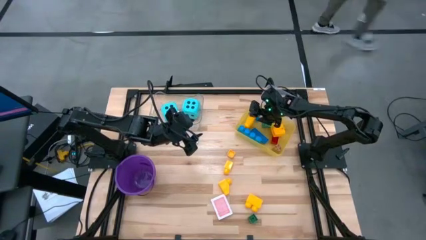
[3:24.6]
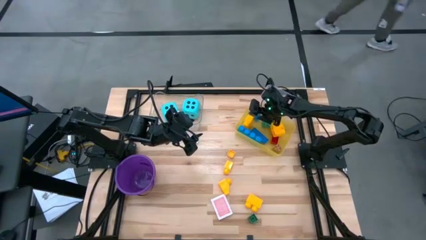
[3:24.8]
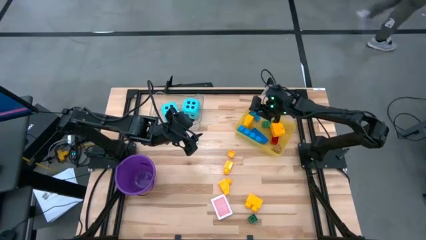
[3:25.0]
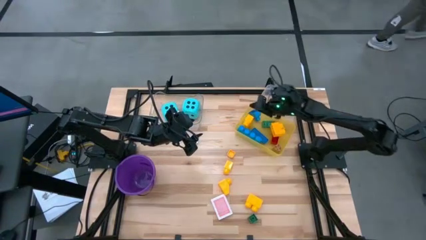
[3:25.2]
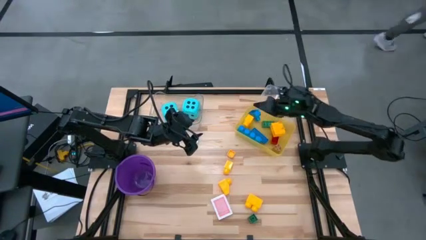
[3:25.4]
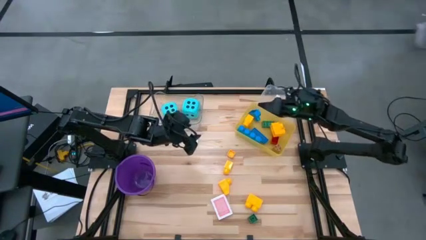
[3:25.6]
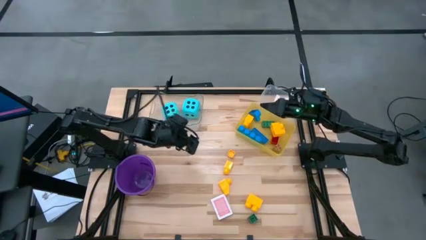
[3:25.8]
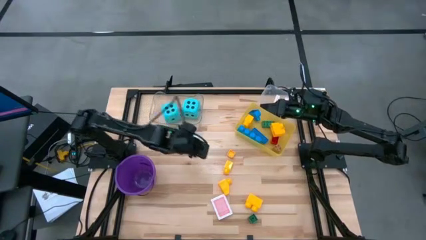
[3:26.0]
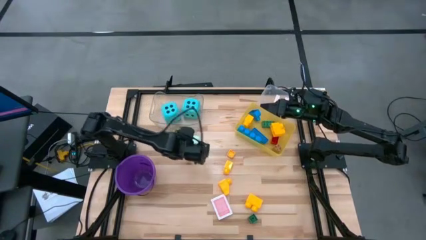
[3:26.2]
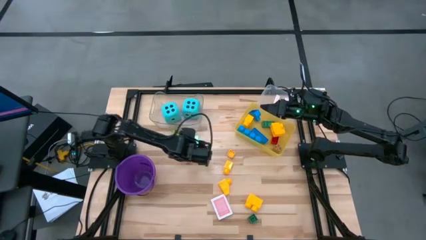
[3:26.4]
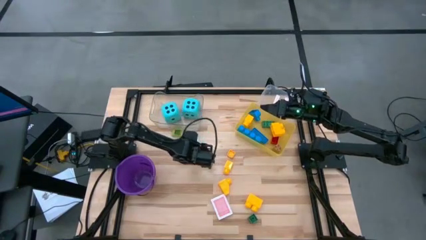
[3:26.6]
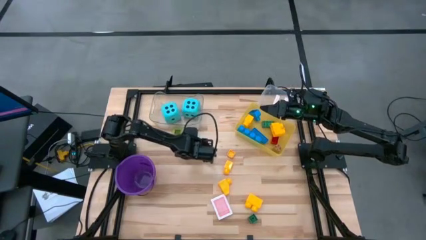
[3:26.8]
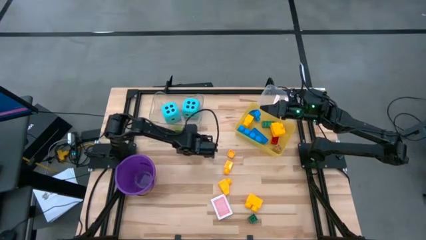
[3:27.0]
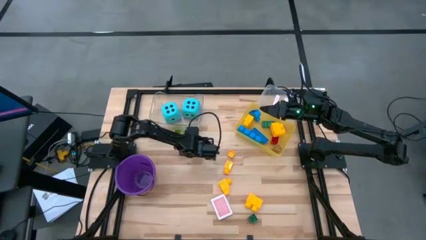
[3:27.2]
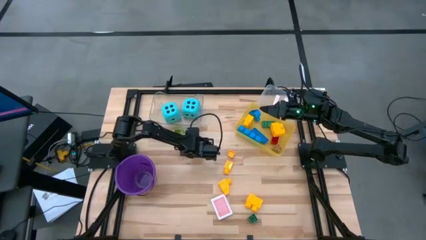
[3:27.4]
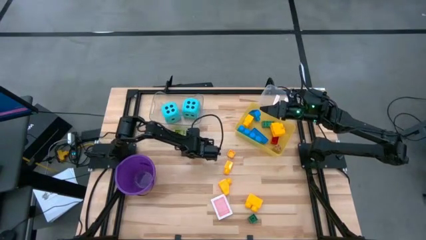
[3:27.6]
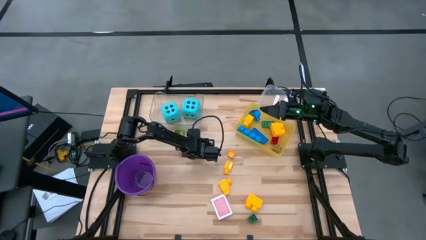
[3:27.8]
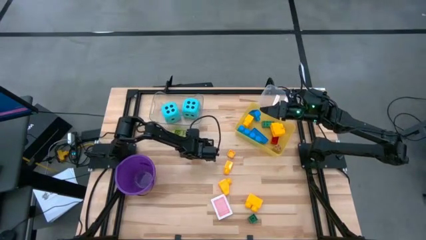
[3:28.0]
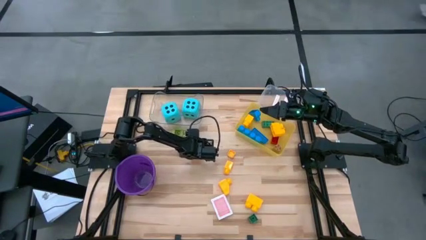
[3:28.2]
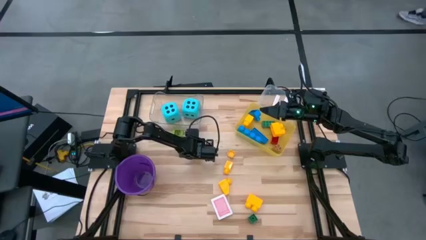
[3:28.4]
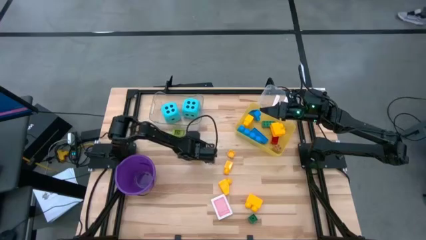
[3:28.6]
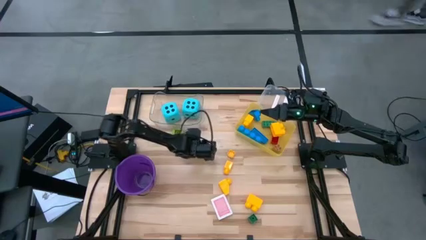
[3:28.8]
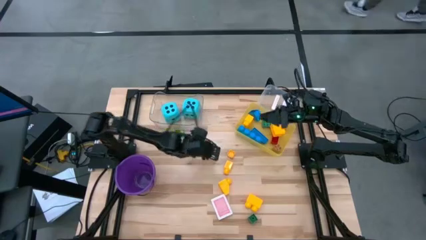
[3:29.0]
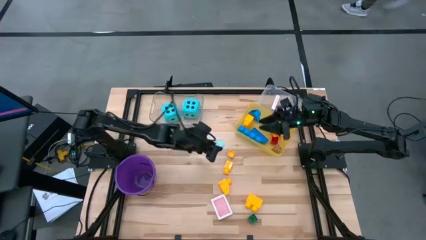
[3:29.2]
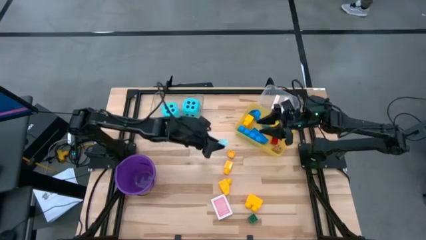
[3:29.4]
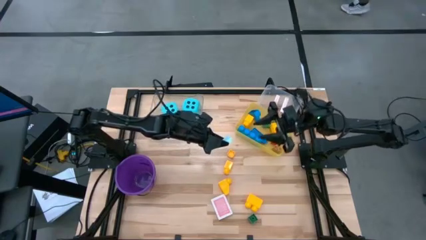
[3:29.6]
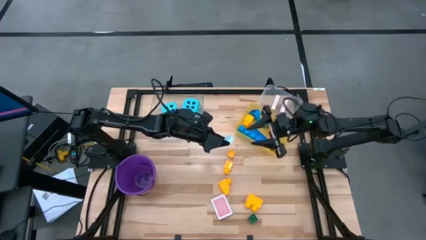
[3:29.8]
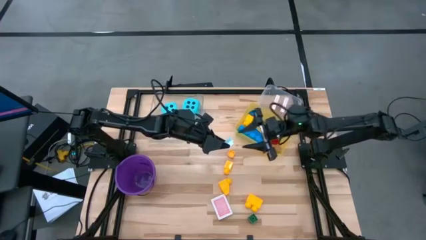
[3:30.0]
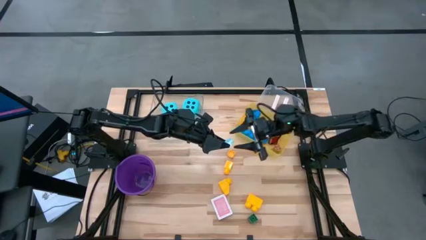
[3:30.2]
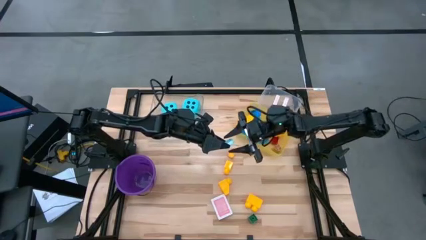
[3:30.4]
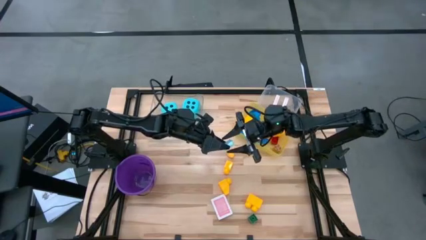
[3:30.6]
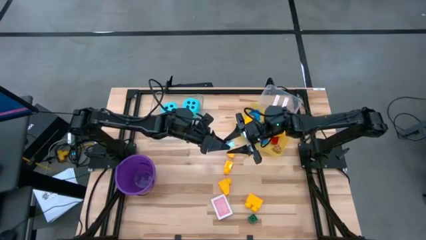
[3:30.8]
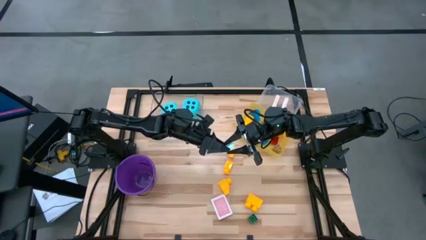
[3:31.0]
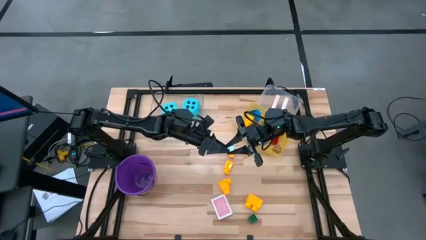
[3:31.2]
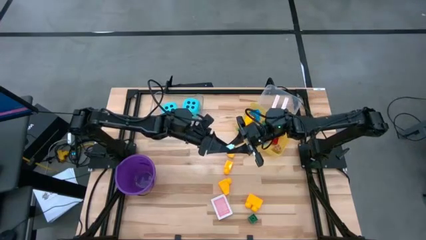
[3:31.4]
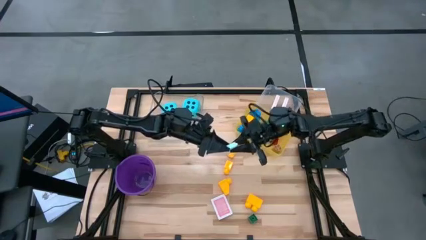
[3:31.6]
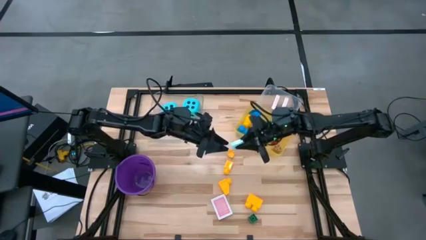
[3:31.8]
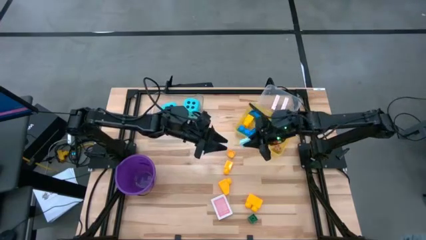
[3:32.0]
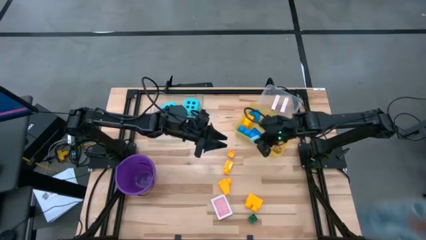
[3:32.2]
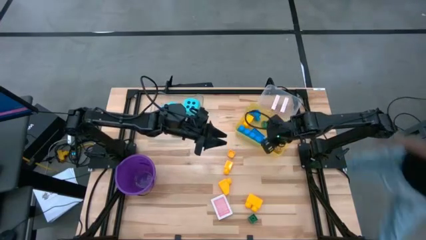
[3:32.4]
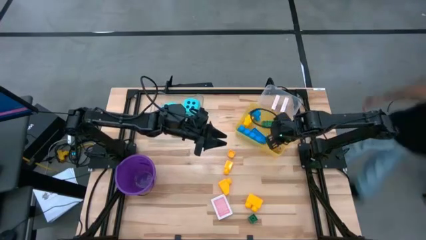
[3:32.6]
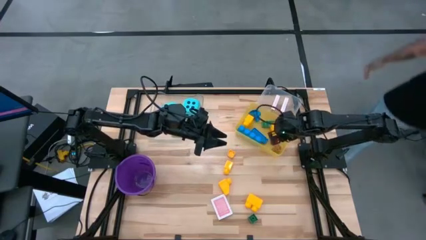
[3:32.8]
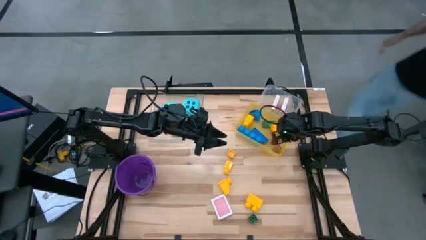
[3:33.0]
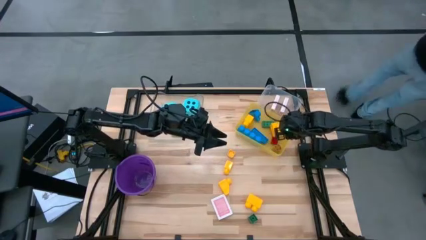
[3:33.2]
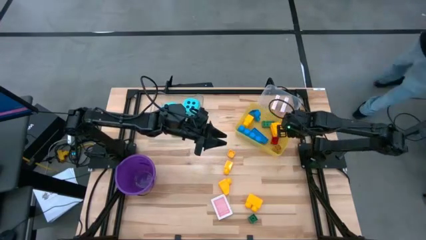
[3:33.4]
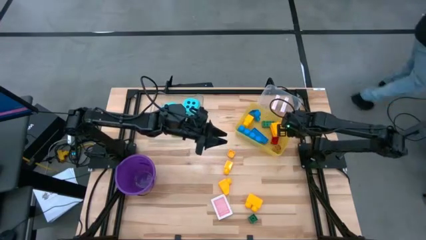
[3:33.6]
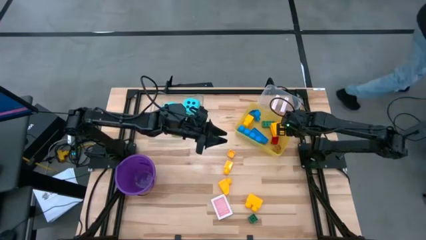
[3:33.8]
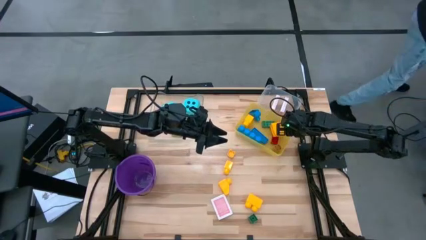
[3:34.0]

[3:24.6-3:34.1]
Task: Pick & Place Toys
Put the light blue game piece into the yellow bin

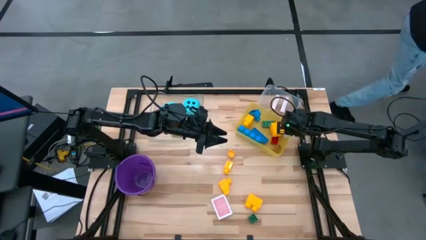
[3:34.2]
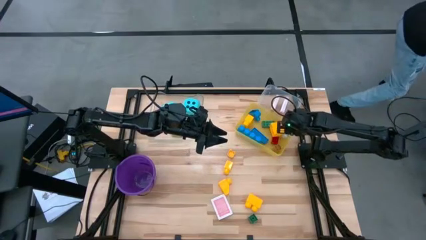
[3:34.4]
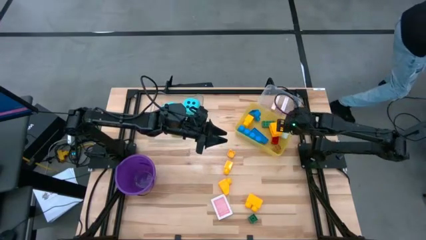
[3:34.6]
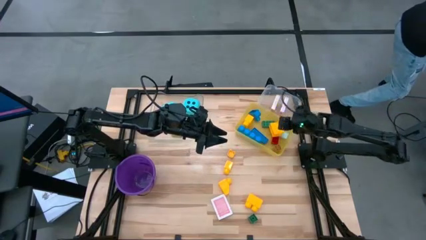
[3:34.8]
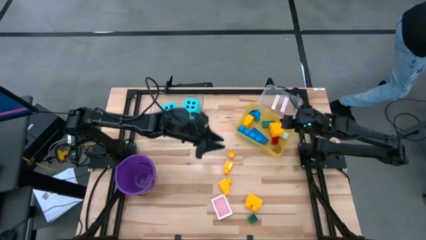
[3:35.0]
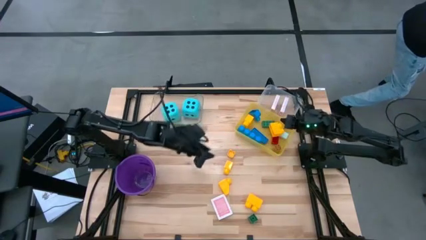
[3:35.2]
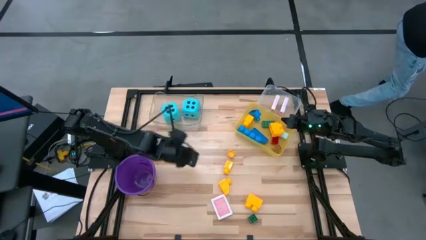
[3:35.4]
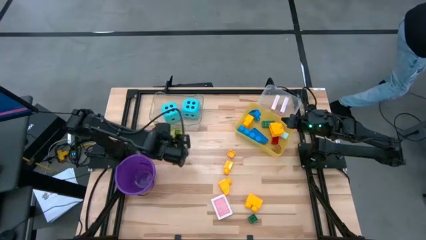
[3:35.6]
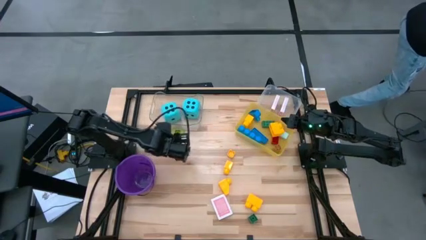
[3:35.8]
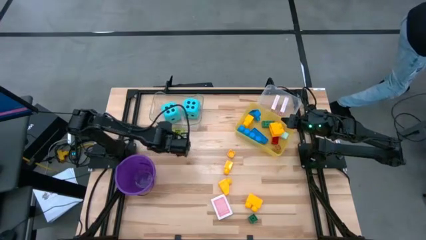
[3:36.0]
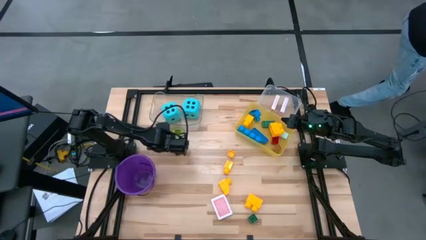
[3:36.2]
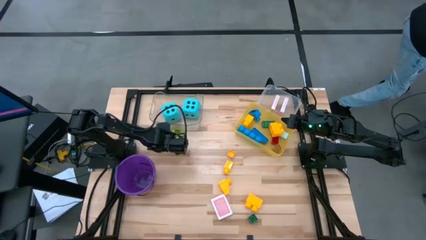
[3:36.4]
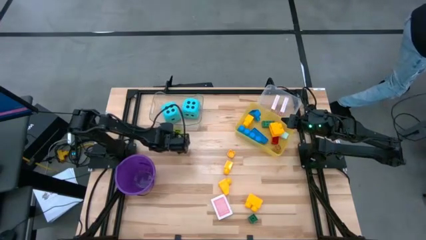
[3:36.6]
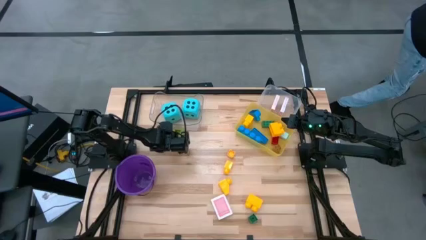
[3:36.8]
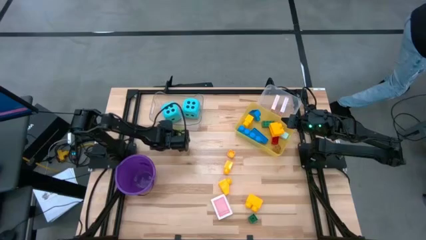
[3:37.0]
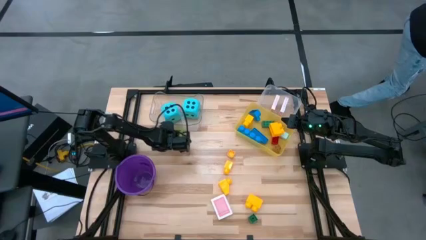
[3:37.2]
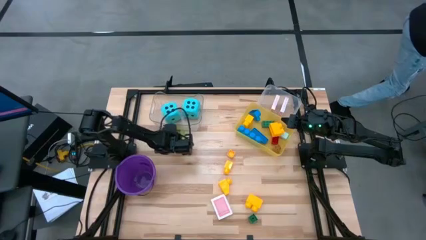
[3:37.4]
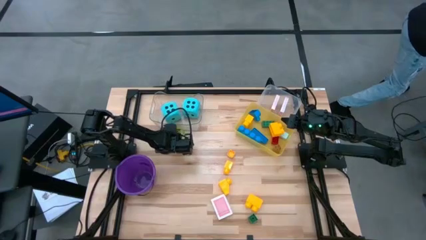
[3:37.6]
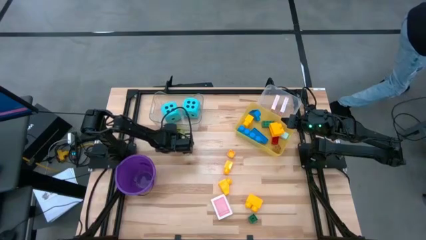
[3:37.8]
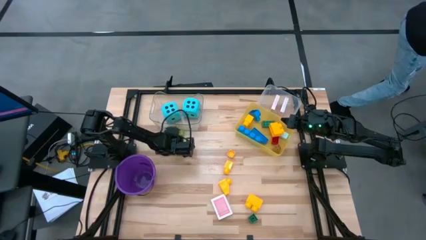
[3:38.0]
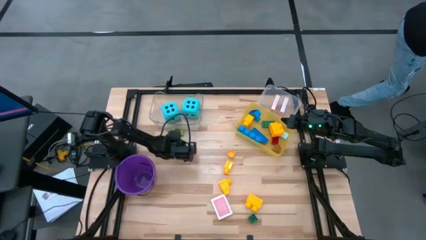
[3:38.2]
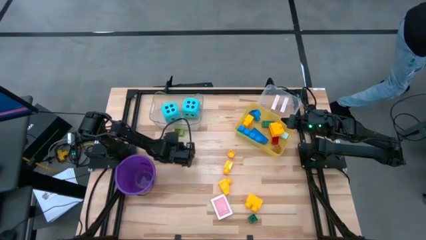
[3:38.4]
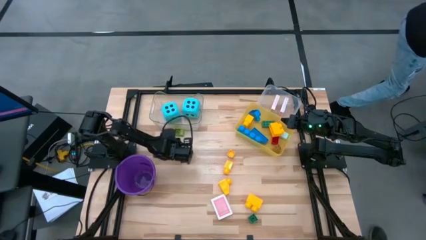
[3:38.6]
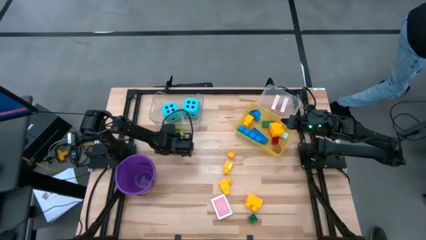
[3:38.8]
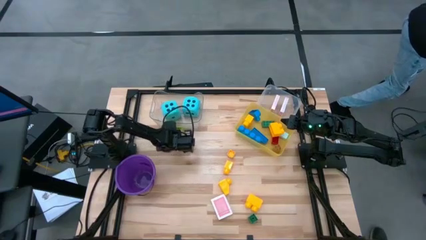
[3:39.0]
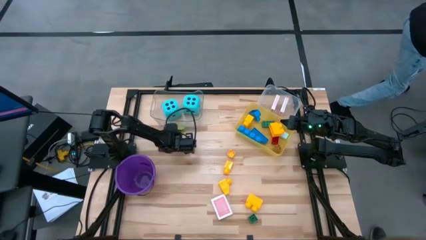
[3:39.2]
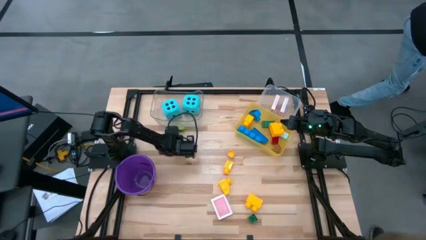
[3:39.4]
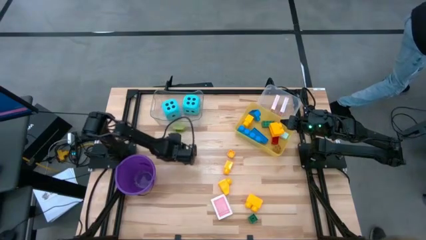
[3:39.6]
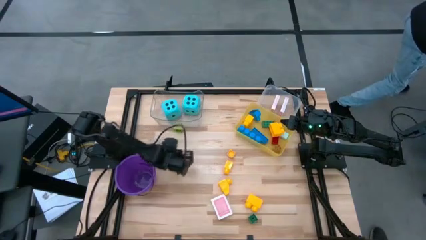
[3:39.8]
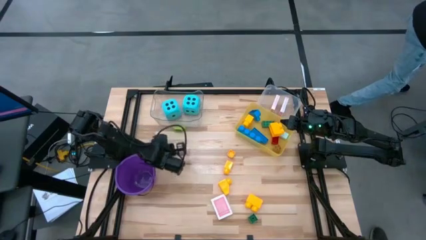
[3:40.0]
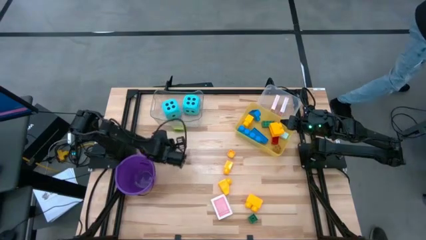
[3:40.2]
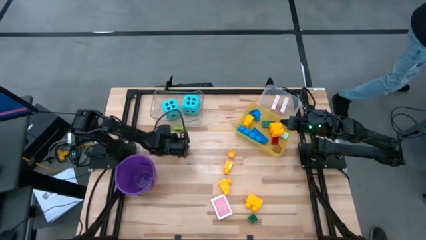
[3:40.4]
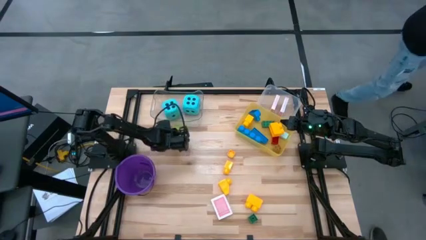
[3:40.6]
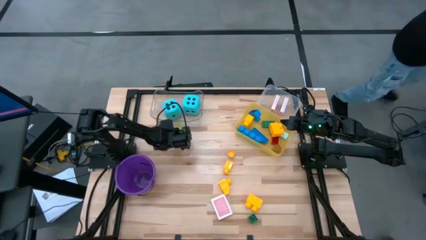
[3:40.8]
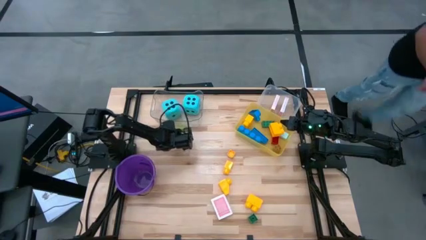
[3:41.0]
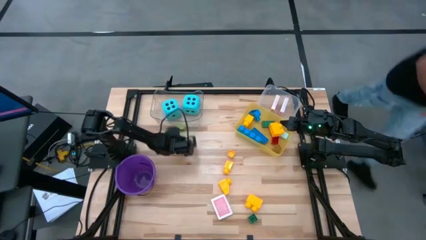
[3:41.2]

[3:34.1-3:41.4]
Put the green game piece into the yellow bin
